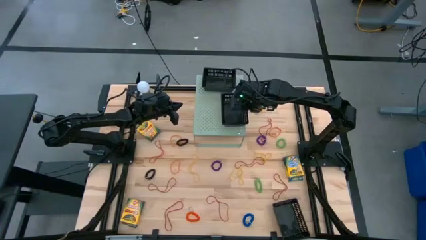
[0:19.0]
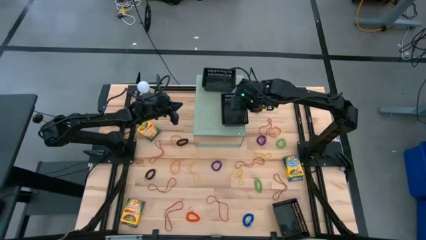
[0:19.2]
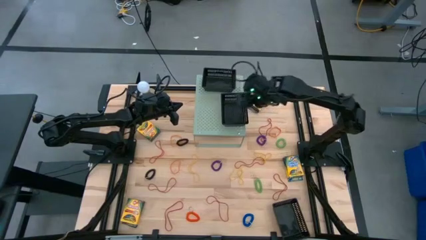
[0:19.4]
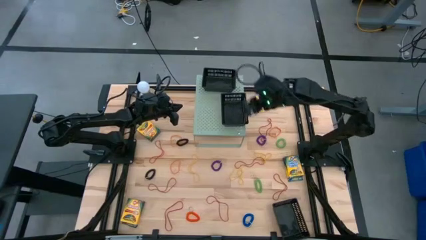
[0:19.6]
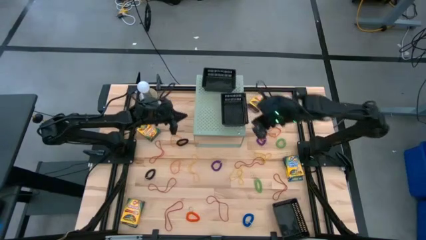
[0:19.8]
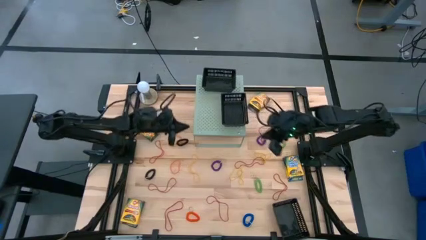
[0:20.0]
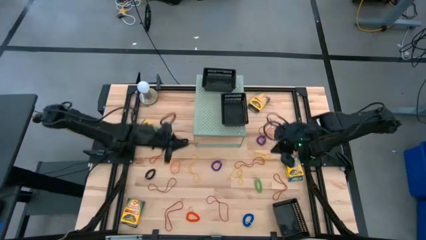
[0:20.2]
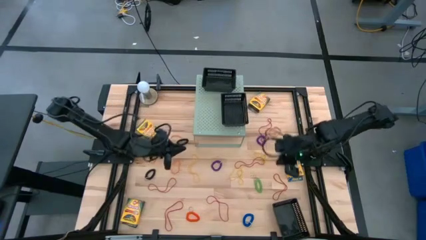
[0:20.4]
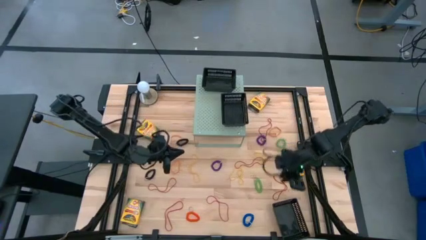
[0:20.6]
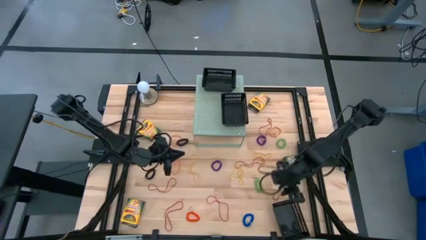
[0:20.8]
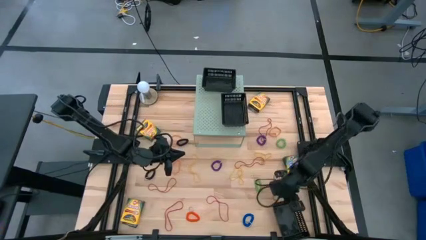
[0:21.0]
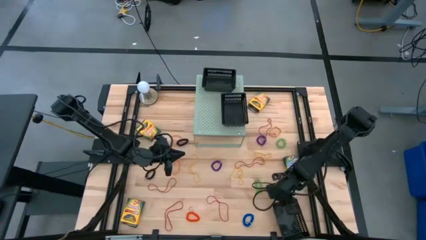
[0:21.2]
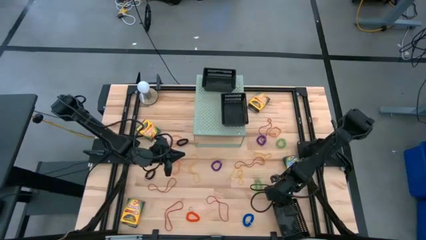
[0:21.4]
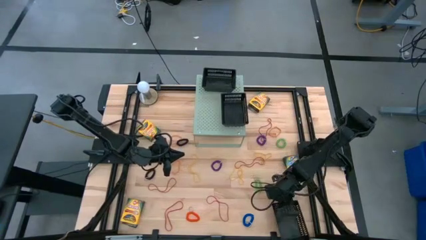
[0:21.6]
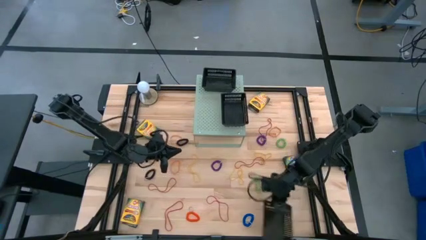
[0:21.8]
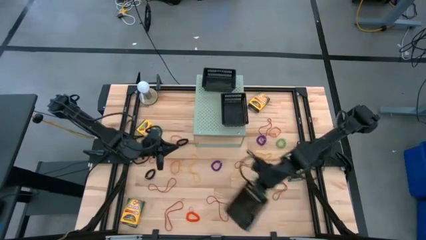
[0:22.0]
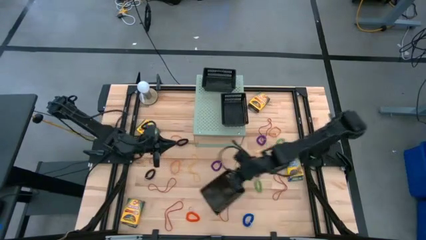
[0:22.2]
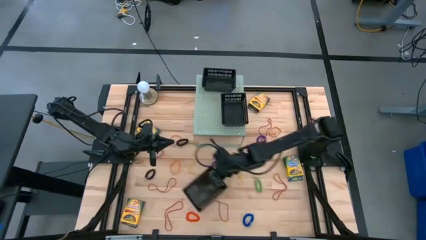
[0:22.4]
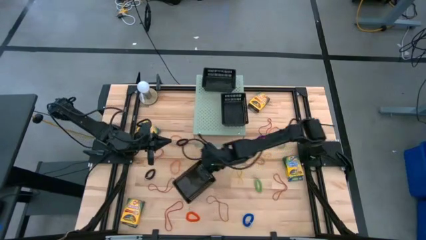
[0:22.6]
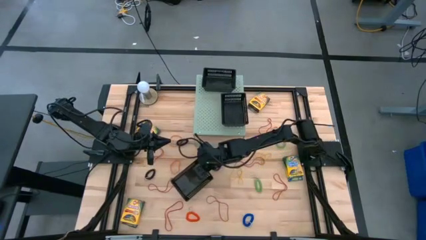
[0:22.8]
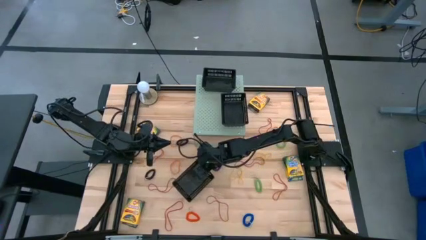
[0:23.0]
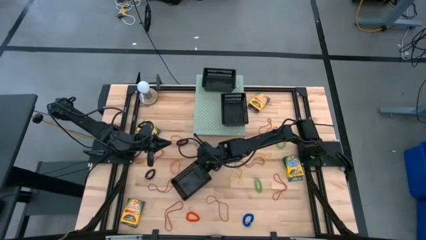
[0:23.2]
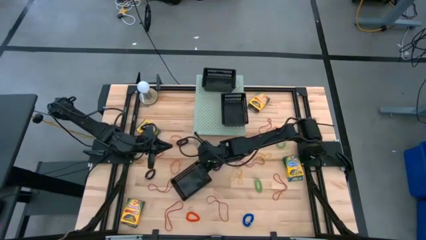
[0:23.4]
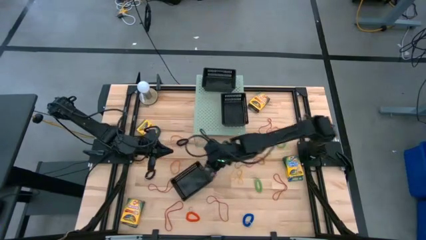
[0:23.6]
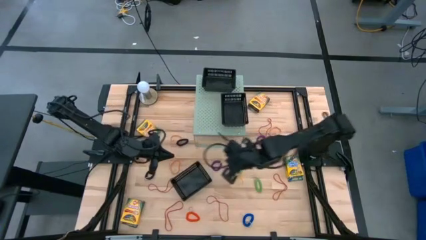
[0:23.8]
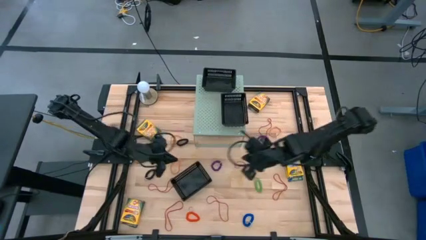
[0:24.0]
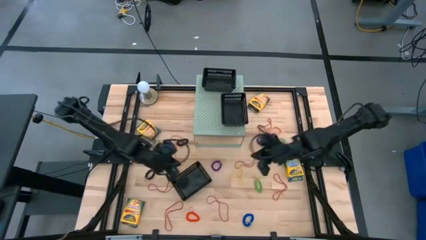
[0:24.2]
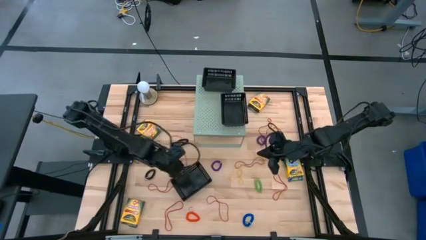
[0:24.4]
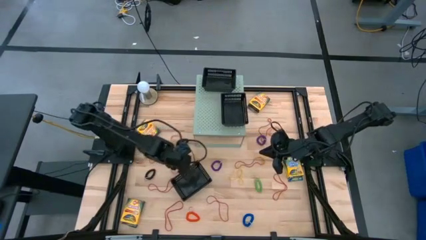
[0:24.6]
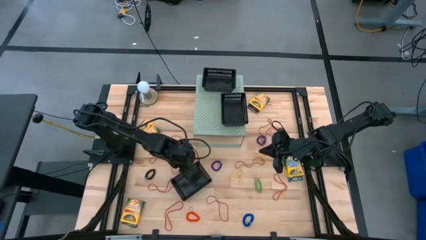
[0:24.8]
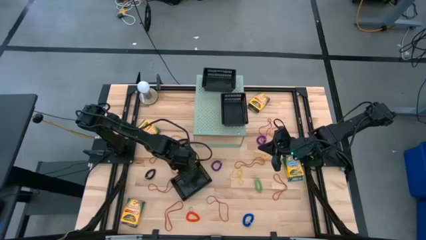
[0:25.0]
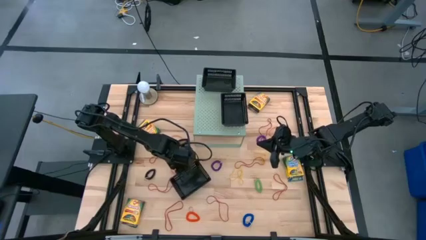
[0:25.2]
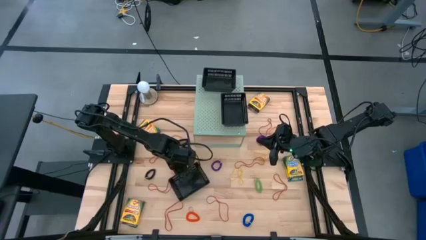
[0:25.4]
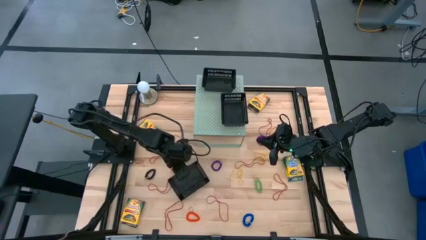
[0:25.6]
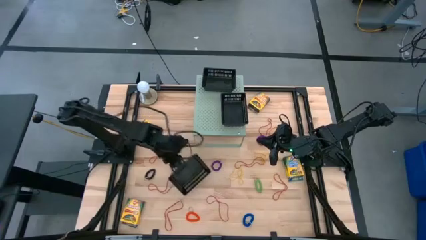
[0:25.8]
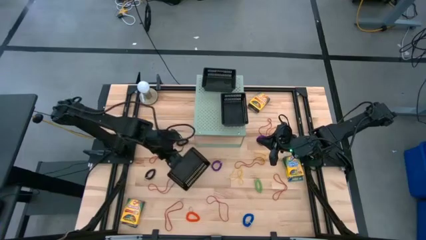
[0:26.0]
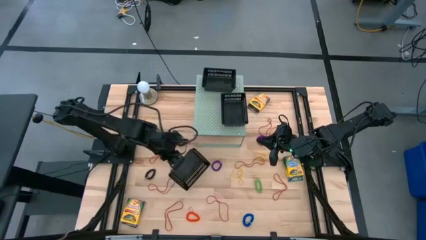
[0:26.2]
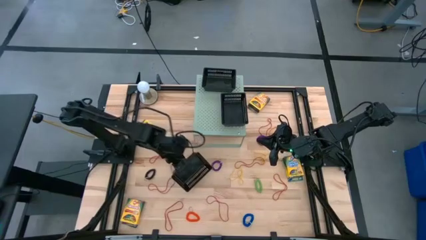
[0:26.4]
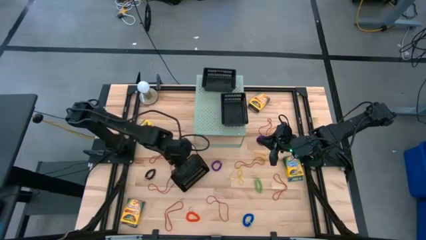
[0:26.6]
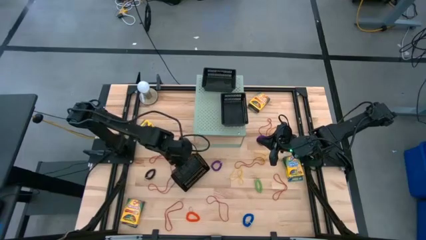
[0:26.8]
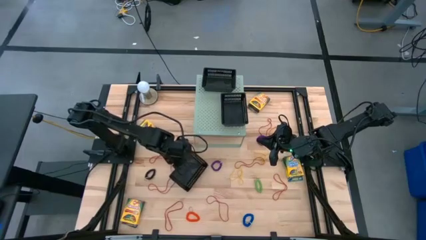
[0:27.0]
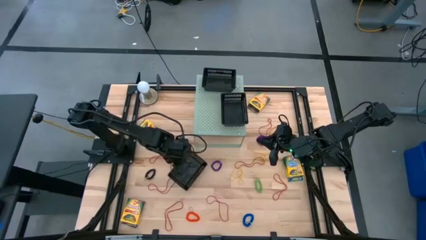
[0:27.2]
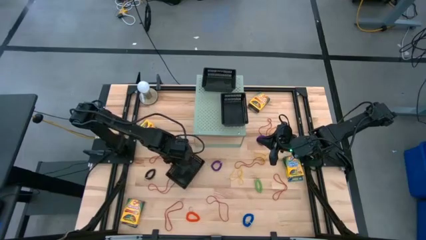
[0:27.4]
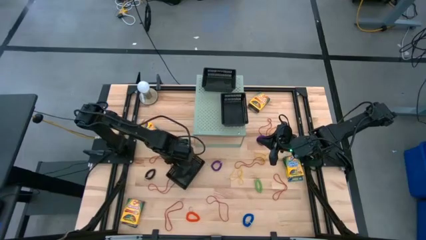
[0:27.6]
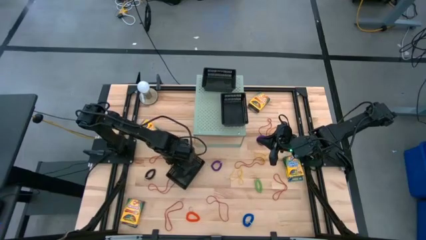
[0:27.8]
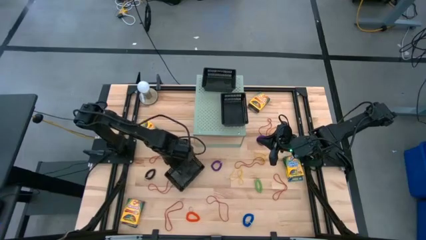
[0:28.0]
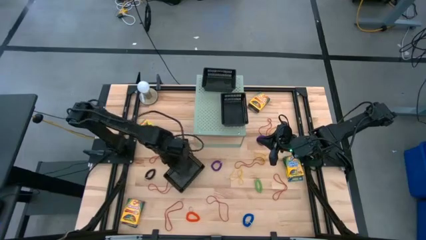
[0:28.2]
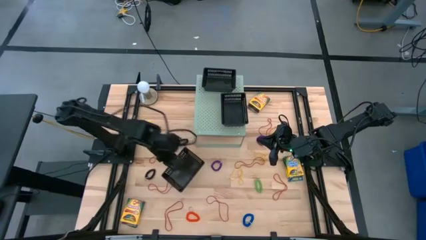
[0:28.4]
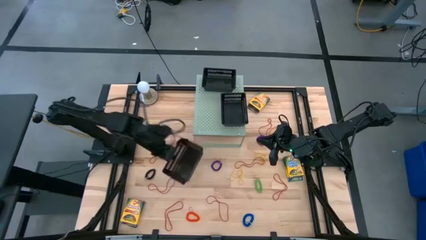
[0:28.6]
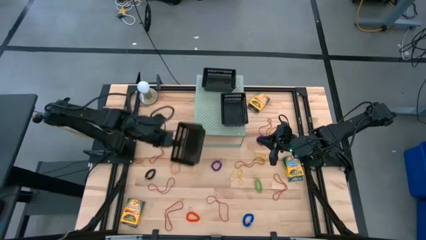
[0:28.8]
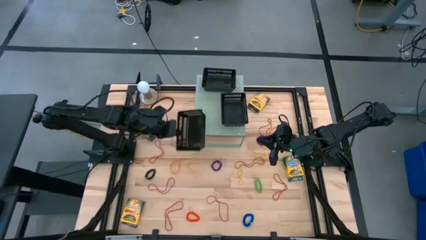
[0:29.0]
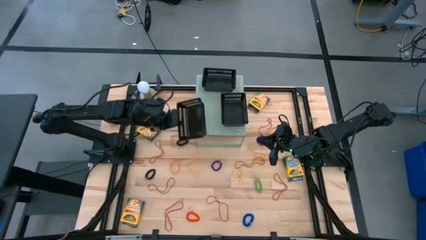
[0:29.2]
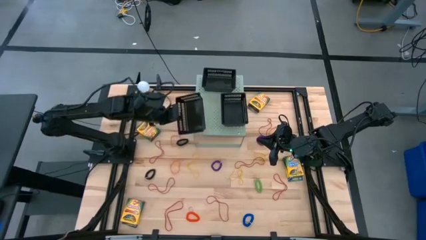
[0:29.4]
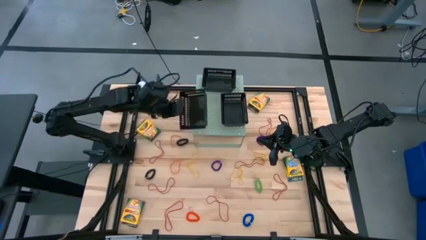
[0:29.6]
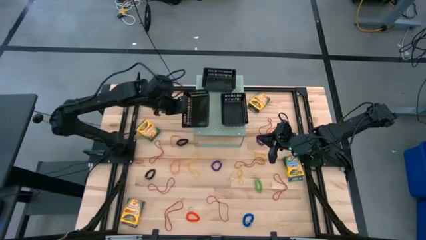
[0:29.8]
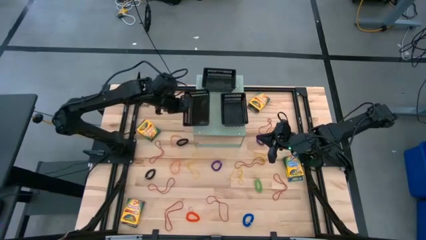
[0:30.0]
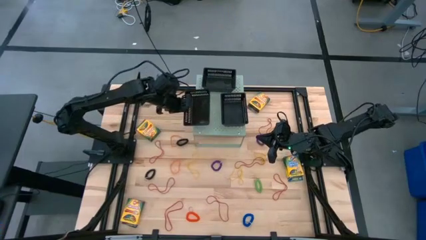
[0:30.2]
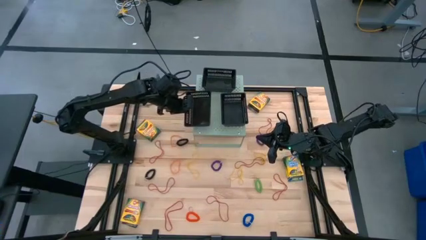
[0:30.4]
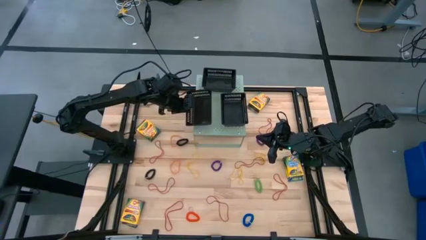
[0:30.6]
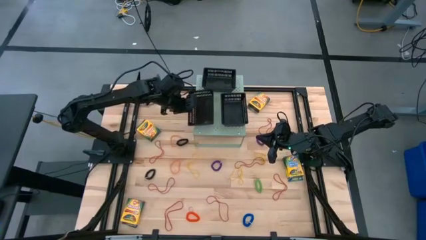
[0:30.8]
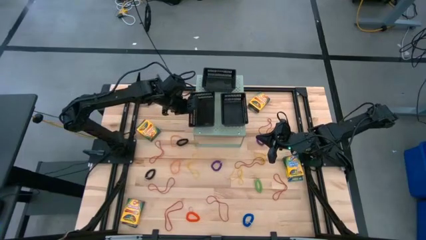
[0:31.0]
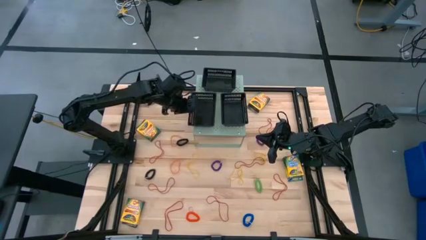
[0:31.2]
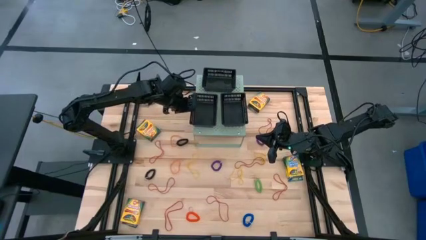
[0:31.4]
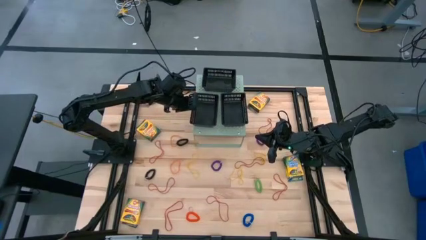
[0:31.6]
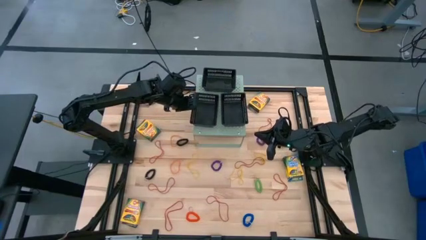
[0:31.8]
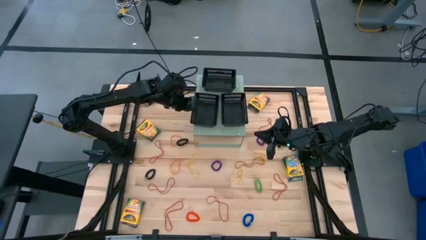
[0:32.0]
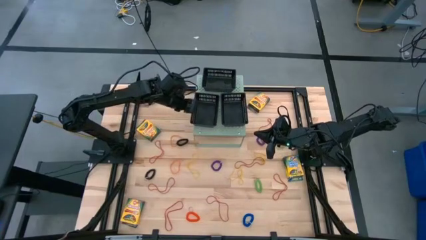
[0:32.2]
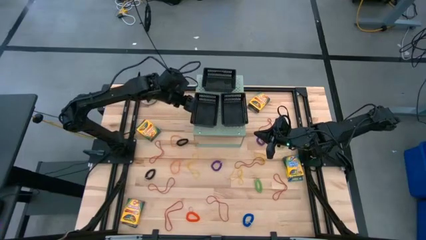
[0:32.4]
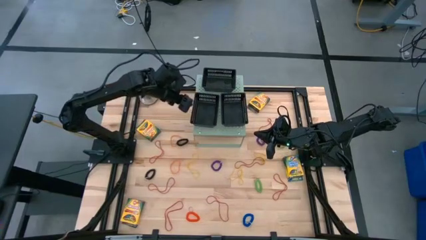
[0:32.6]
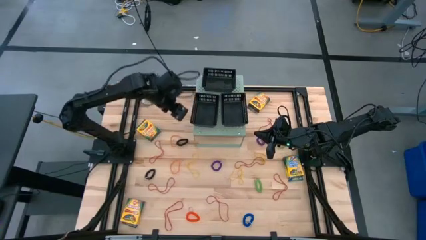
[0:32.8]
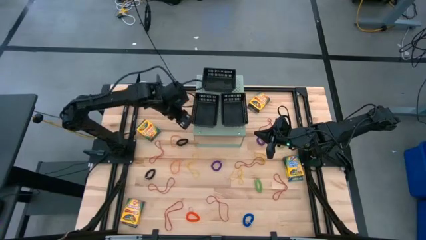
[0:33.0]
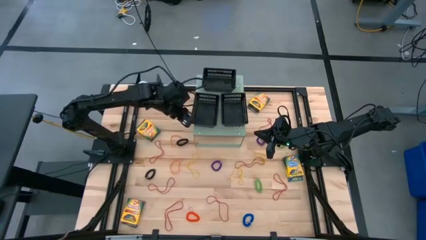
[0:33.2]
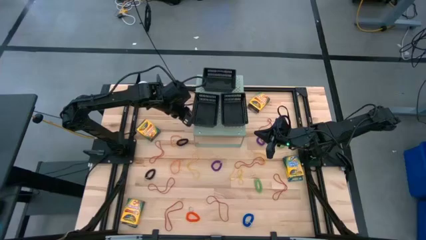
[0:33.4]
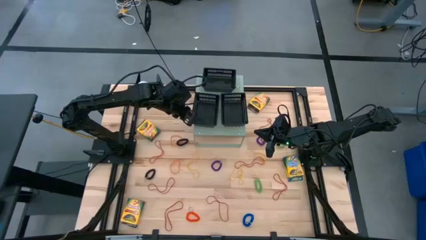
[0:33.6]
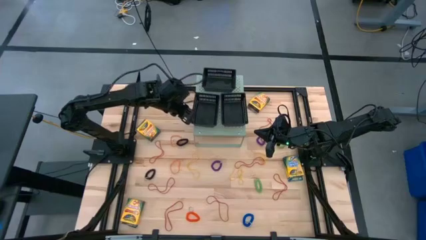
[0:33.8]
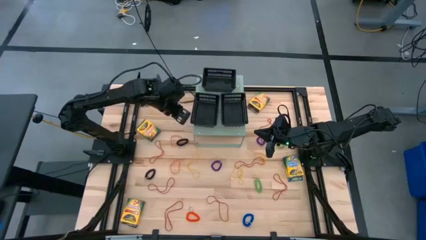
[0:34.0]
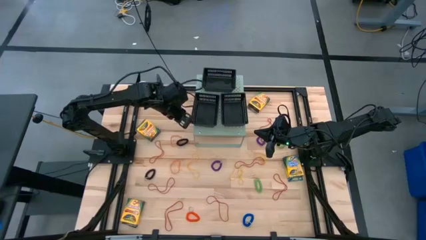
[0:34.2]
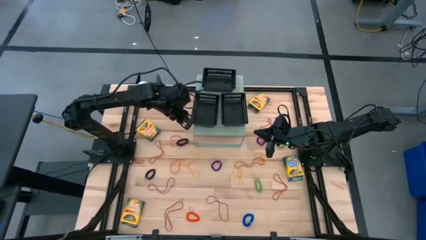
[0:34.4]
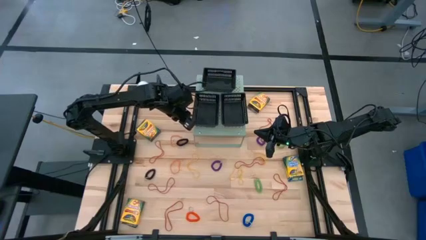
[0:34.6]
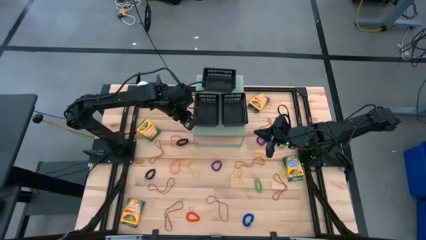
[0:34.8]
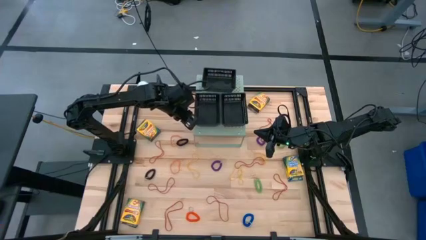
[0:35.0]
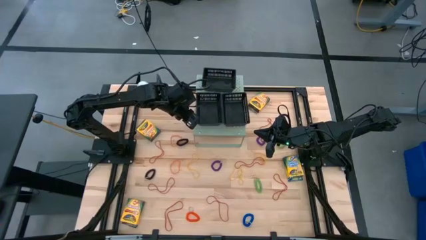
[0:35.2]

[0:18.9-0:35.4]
Task: Pick & Place Office Desk Supplies
Put the black bin on the shelf

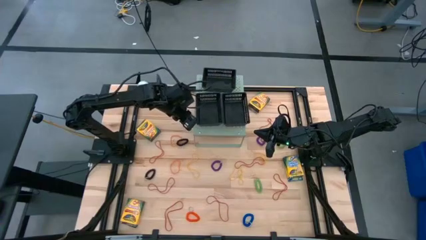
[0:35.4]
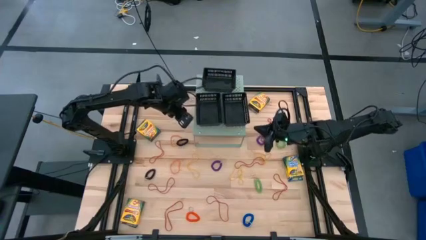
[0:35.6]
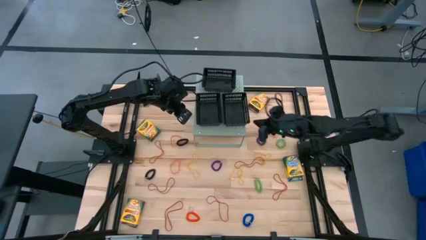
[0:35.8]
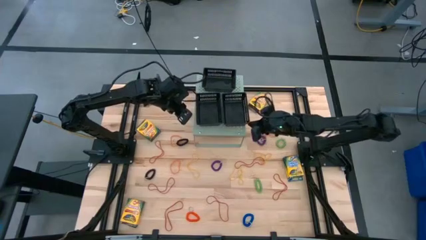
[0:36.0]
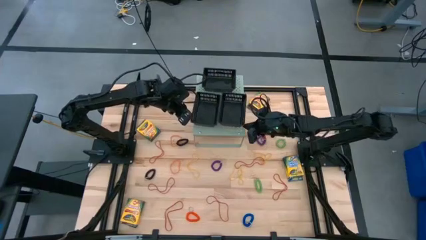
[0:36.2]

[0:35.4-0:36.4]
Adjust the bottom right black bin on the shelf

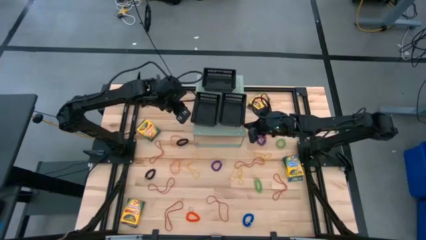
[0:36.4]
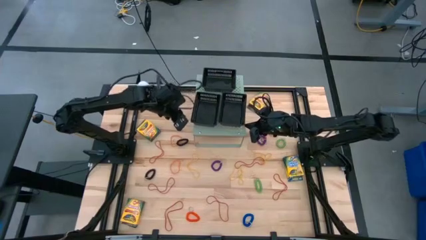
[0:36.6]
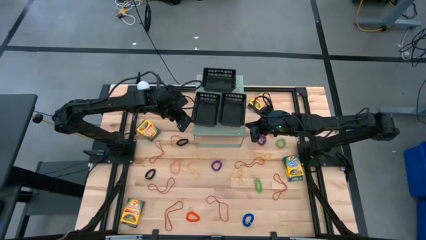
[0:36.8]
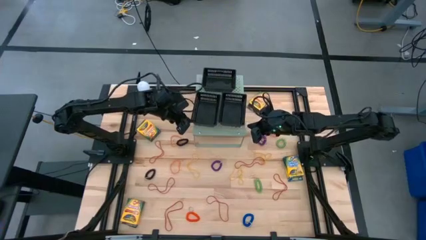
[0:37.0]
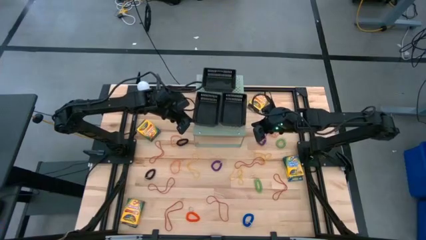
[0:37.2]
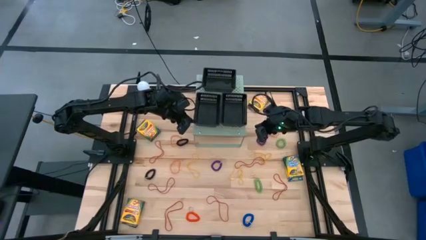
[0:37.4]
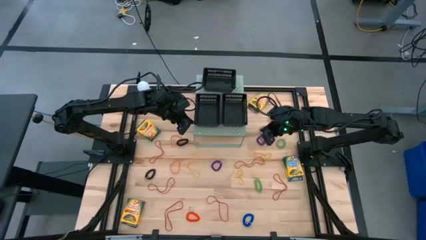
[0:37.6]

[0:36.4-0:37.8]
Adjust the bottom left black bin on the shelf
